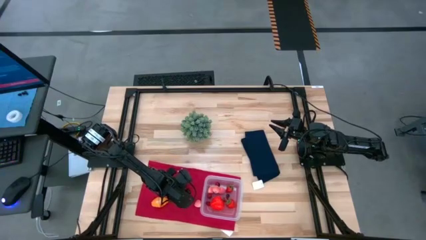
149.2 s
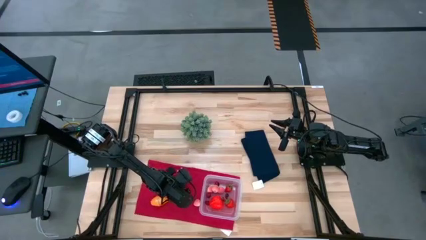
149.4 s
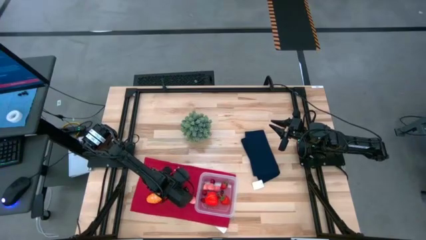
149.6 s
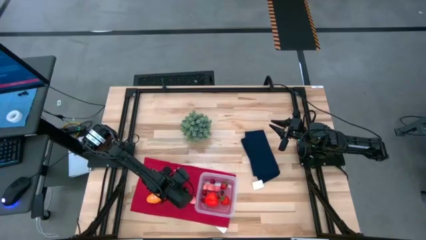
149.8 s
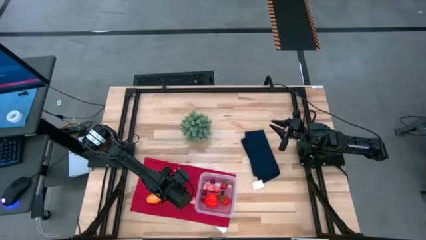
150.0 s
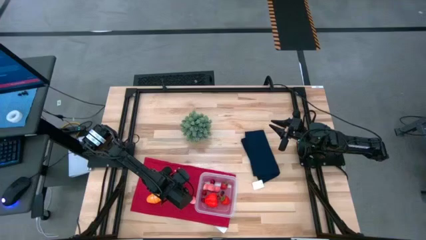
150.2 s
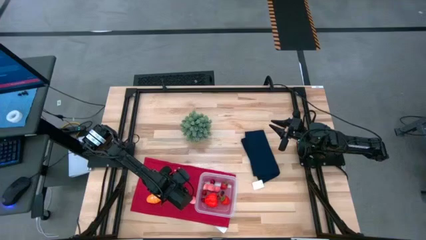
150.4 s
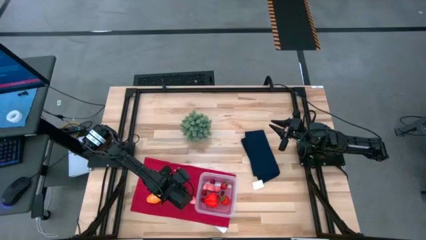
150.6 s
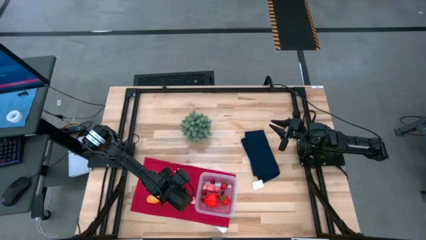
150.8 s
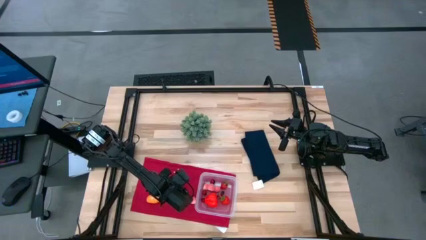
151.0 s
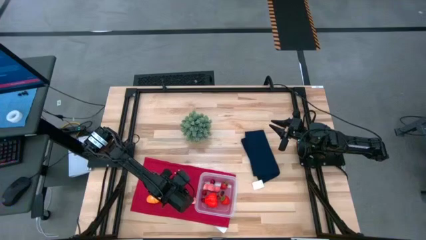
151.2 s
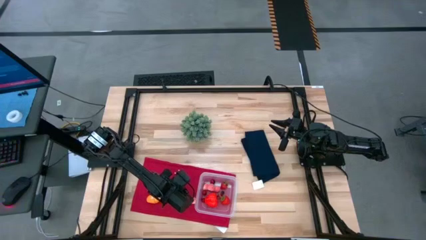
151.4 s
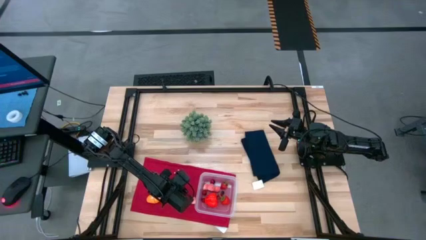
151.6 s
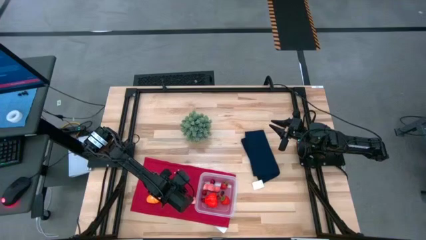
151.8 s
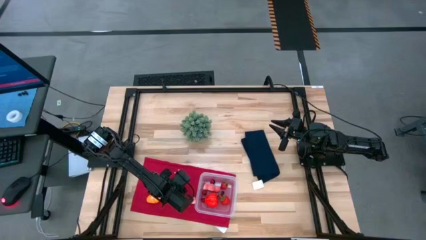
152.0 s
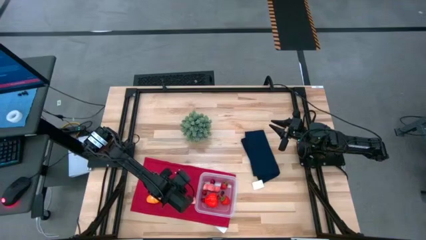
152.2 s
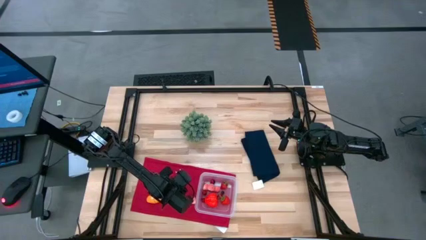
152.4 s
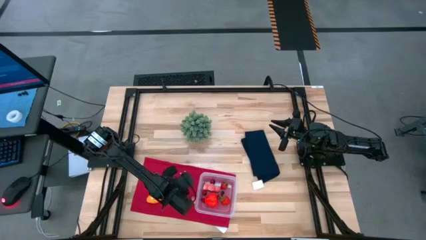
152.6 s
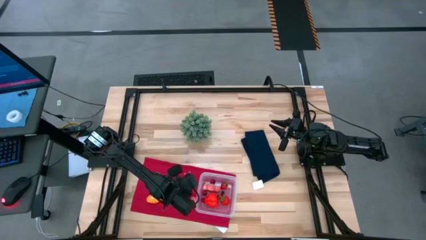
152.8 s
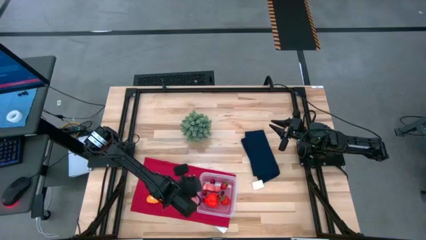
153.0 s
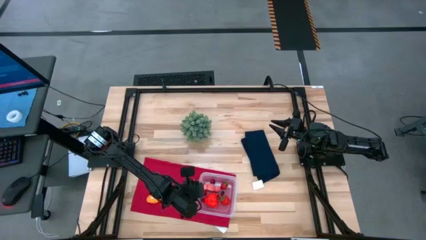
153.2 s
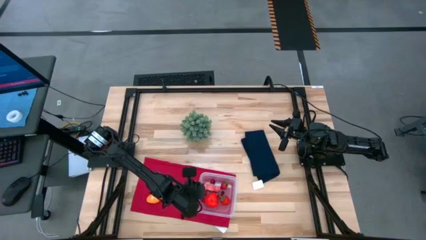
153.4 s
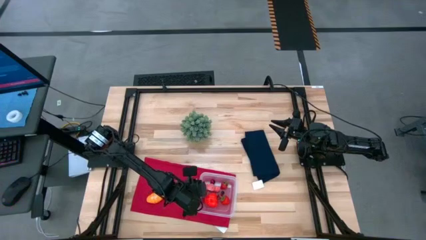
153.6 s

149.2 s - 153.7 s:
Task: Pick and placing Produce into tupperware
Put the blueberry into the transparent bin

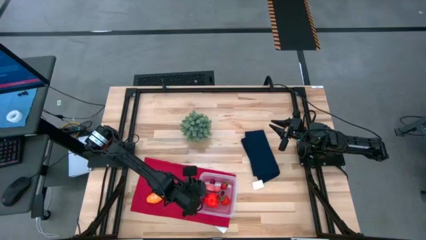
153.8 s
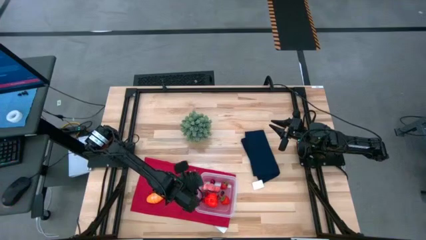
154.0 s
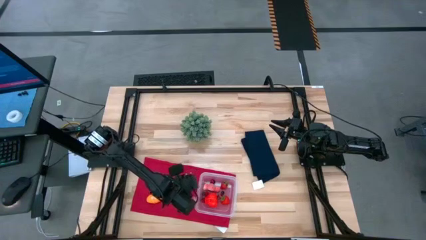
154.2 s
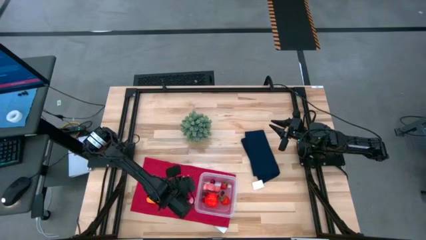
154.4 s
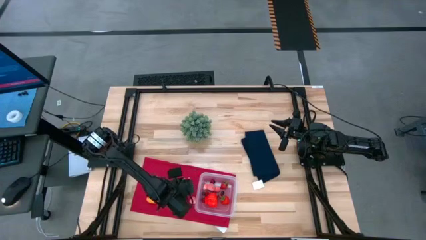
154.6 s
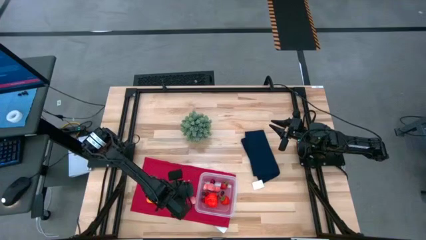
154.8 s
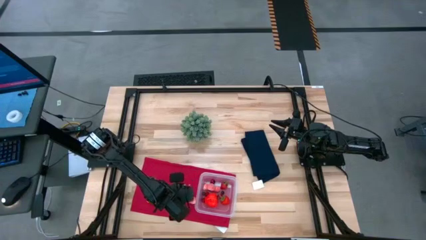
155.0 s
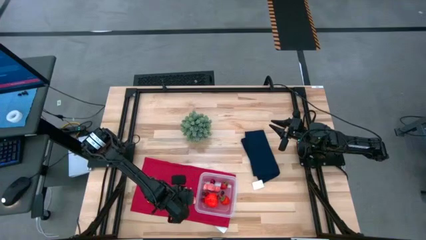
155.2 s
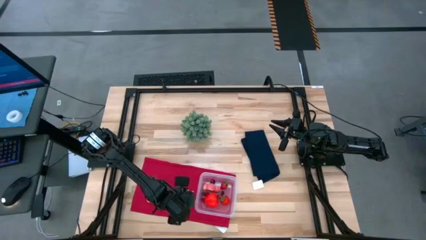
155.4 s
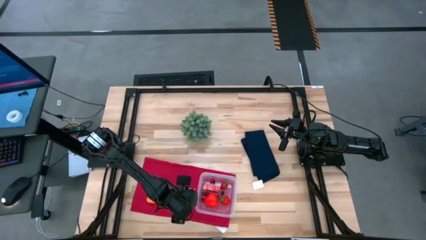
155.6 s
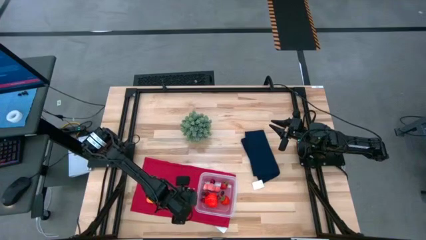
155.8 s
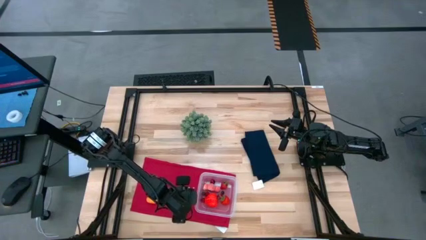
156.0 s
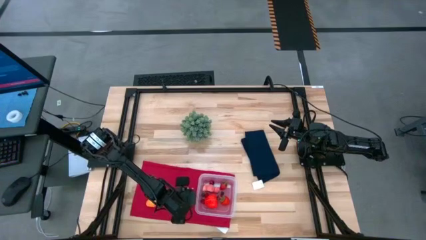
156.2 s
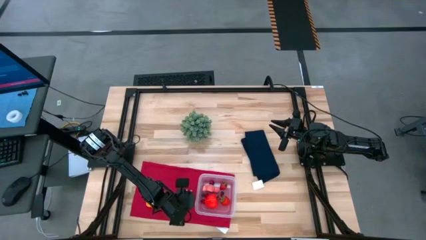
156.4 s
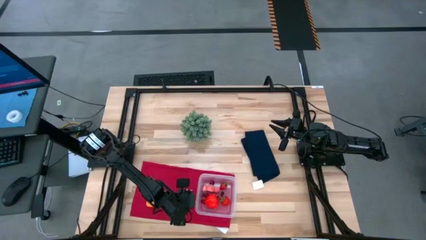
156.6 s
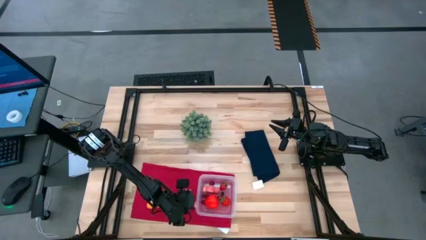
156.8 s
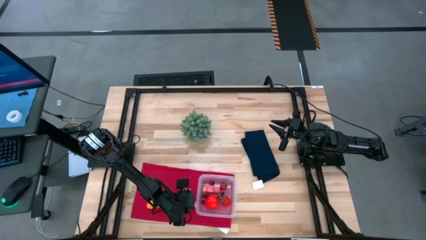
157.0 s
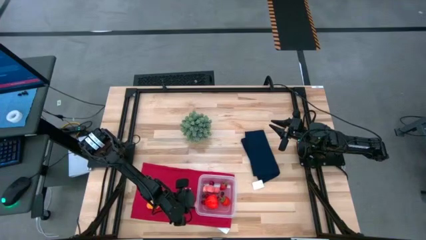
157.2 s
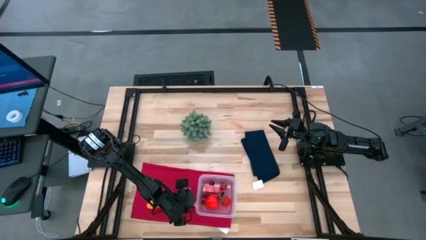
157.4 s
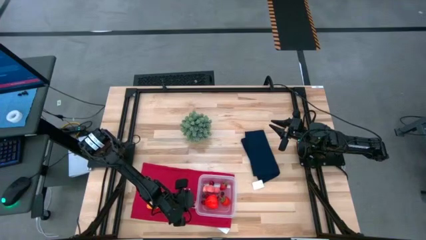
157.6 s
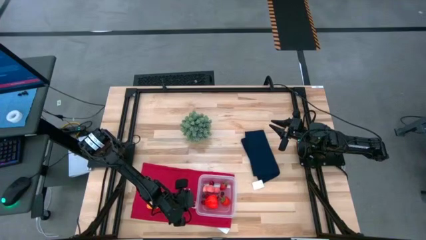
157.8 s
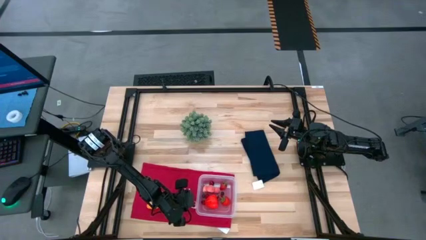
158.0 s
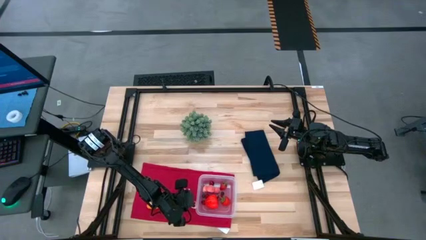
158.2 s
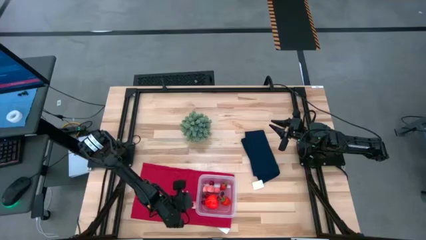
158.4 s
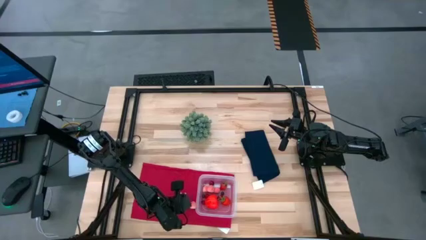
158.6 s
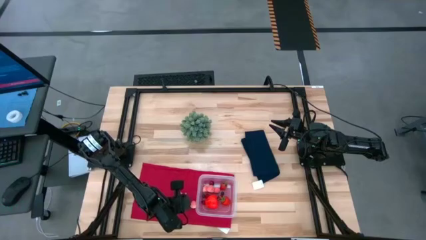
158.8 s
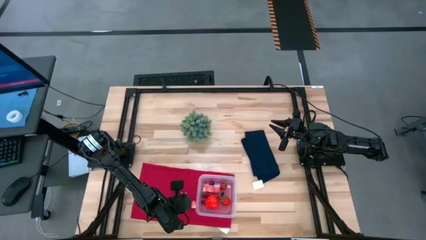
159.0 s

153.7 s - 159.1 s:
Put the apricot into the transparent bin

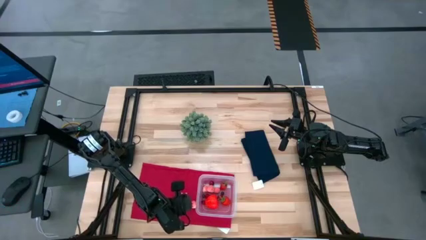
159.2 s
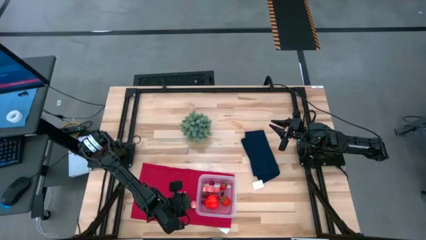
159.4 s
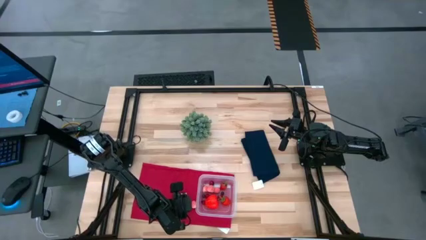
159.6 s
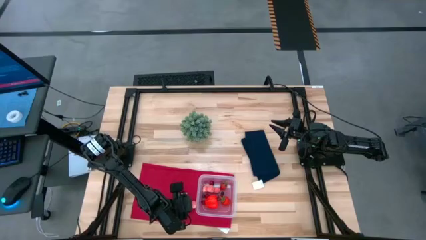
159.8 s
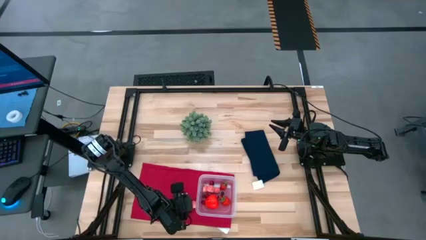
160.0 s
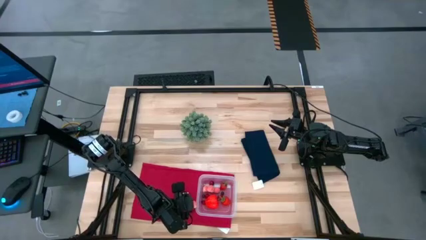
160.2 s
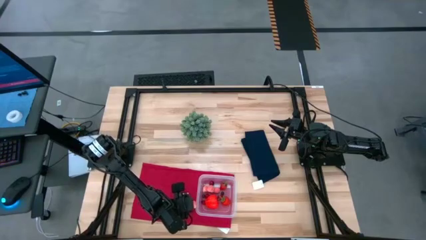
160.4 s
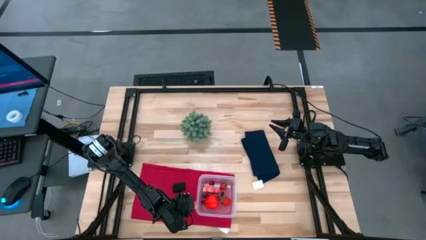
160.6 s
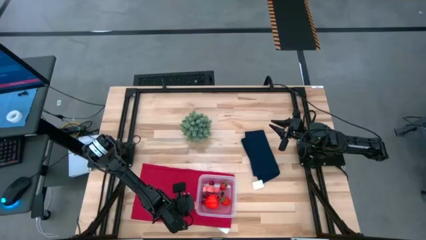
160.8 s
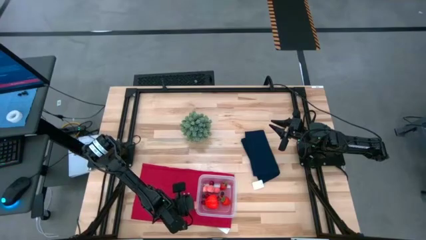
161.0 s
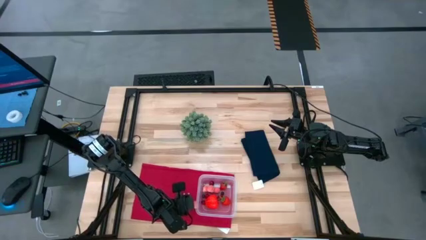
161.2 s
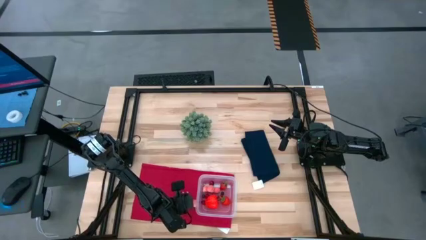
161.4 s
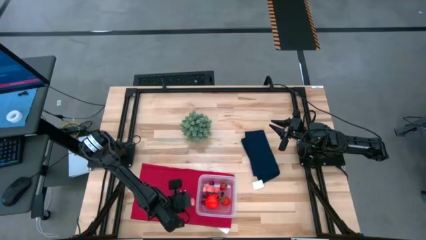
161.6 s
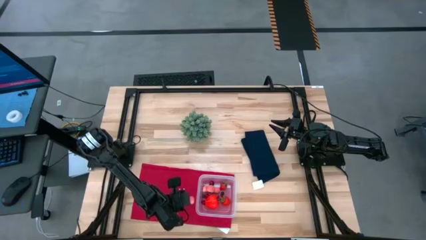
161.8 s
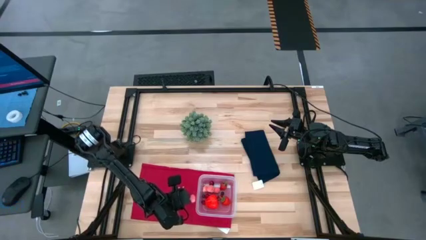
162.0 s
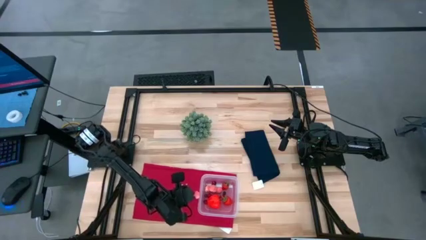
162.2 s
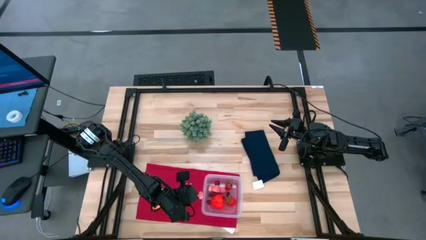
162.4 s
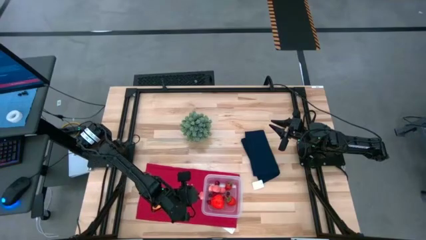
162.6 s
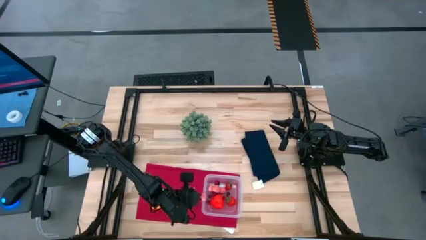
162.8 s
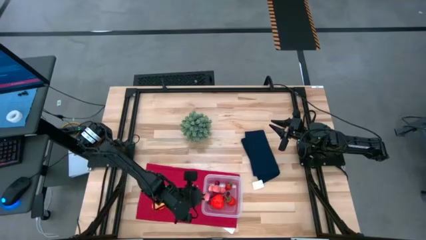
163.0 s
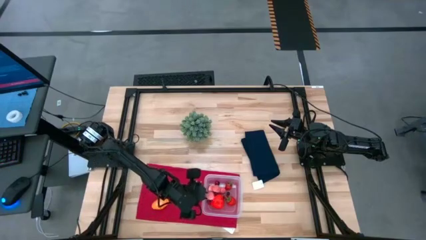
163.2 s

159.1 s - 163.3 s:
Put the apricot into the transparent bin

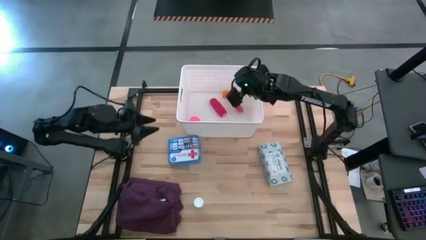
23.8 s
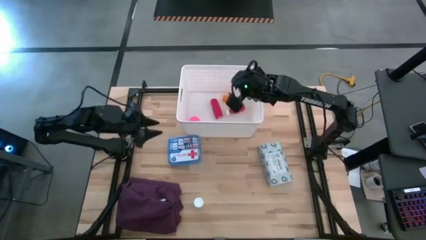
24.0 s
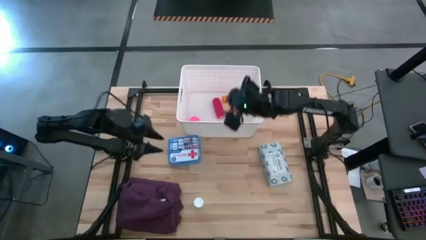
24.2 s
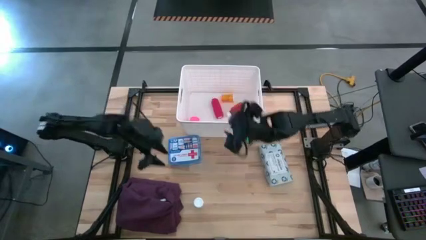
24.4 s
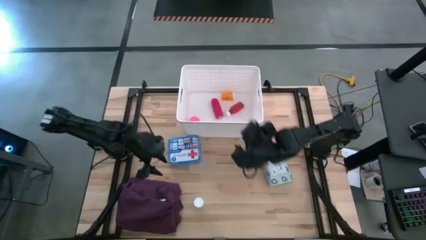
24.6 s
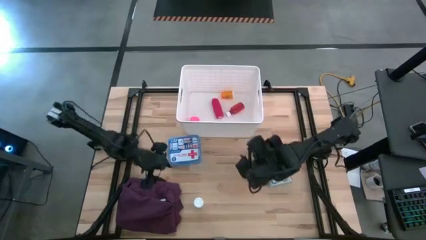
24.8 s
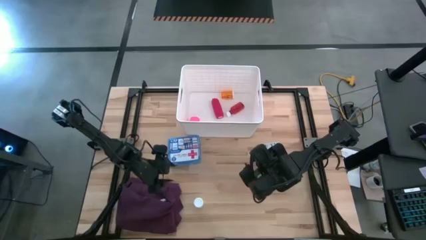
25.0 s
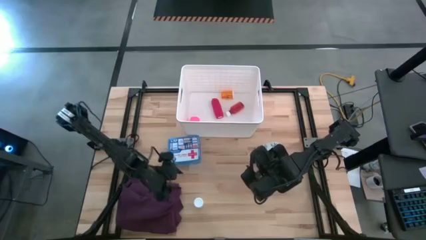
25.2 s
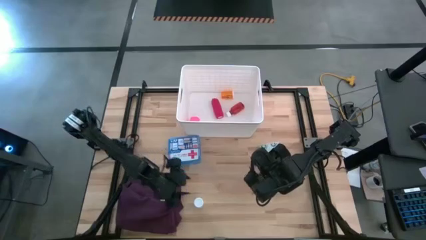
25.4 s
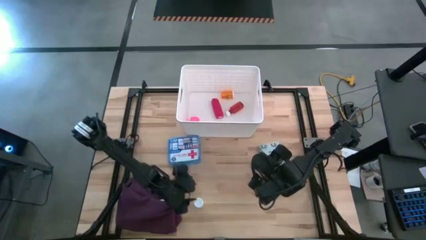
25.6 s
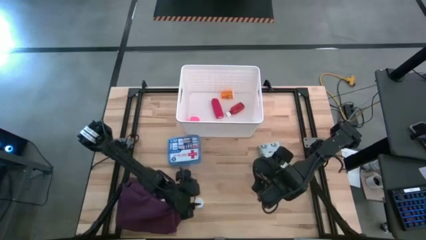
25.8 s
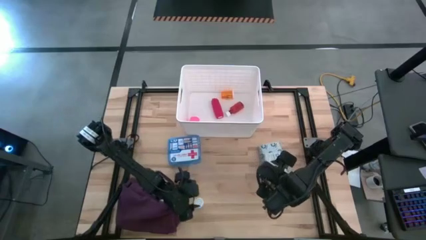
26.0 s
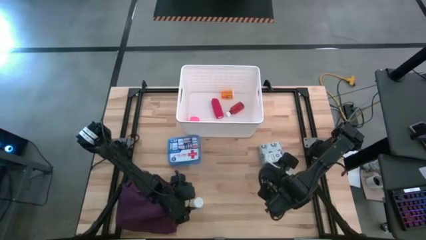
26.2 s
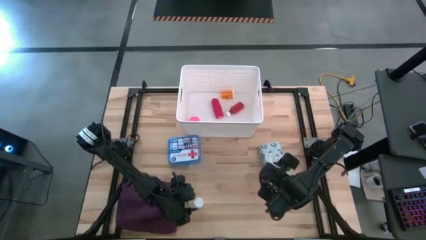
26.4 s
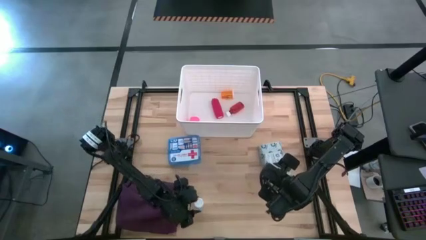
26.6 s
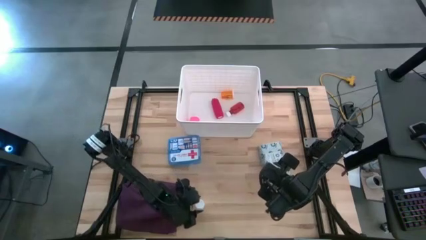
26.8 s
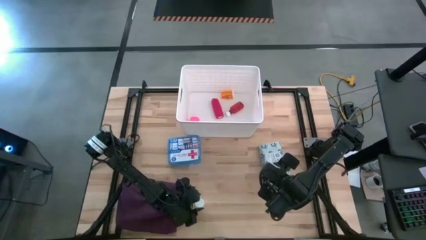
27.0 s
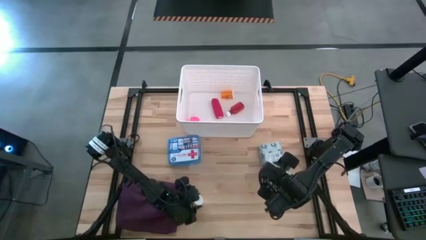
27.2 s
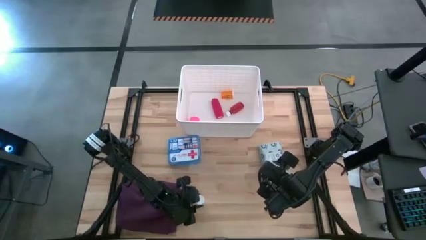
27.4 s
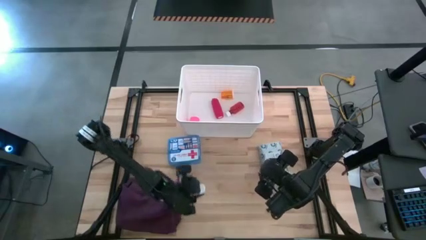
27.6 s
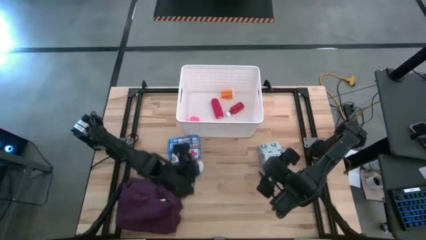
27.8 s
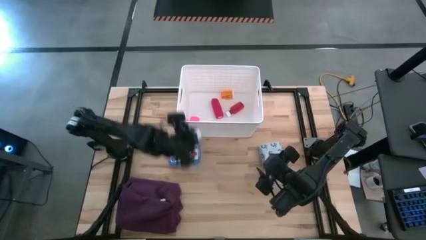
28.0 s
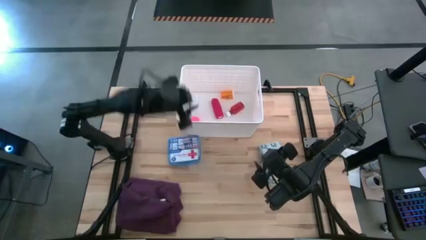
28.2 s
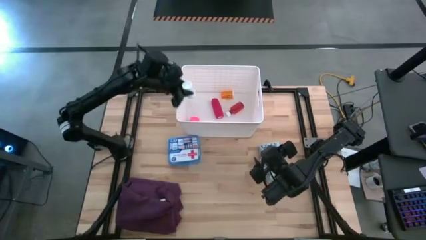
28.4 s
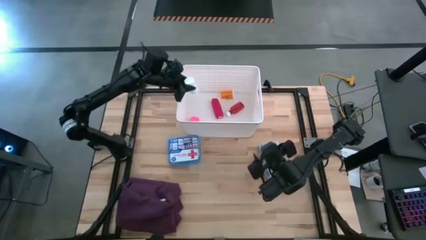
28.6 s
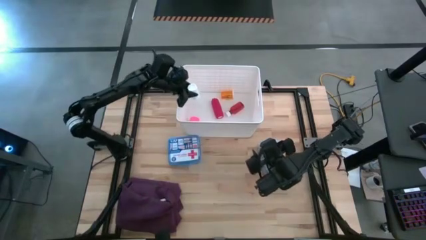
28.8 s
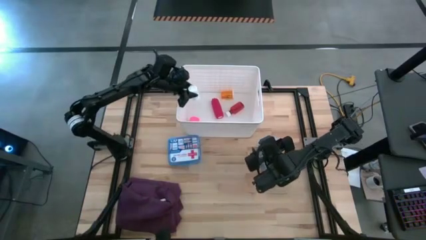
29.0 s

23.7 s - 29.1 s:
Task: Pick & place medical supplies in basket/bin
Put the white pill bottle into the white bin
